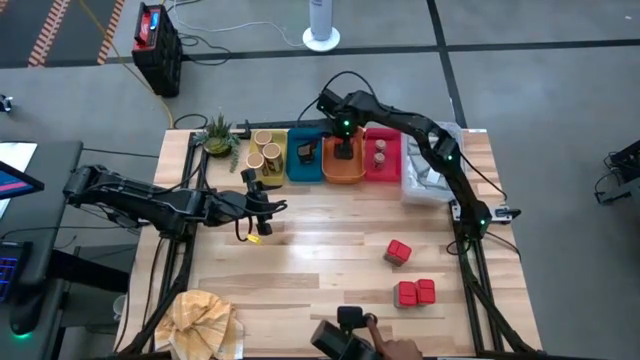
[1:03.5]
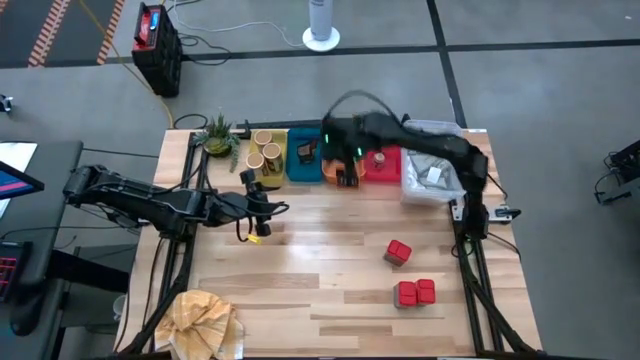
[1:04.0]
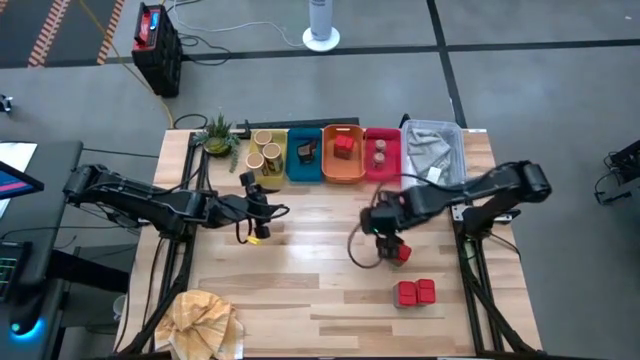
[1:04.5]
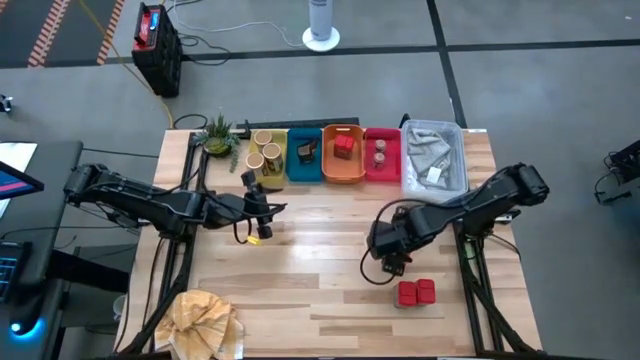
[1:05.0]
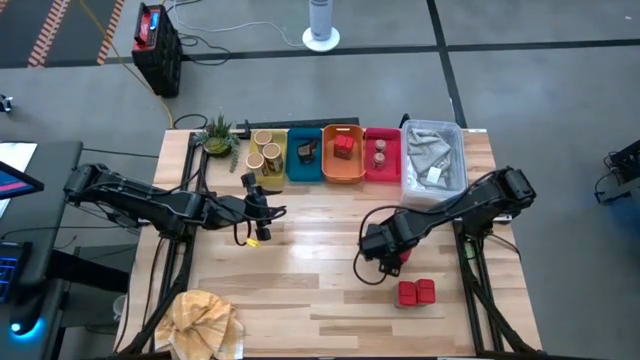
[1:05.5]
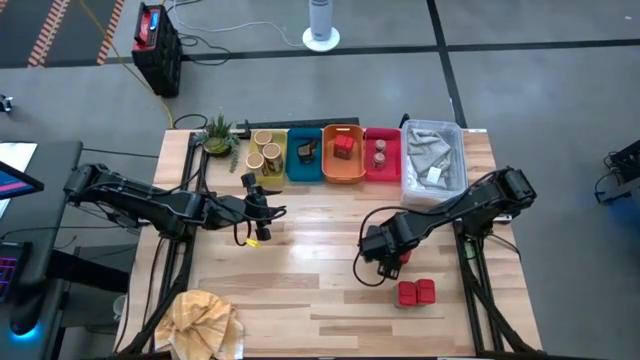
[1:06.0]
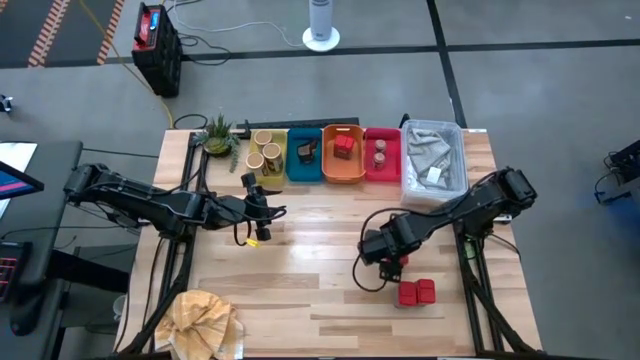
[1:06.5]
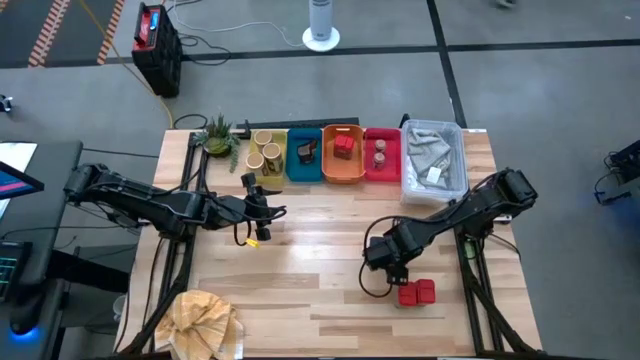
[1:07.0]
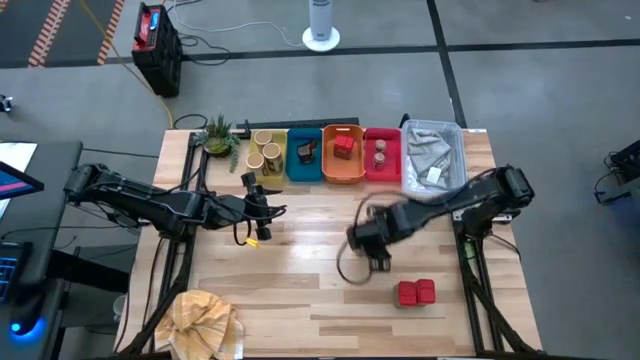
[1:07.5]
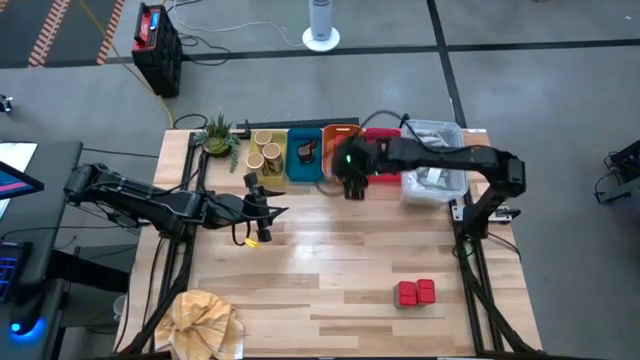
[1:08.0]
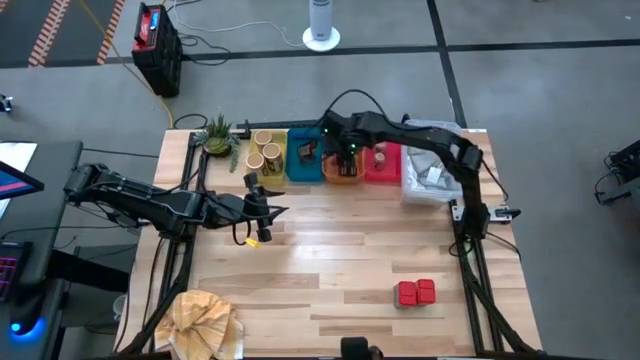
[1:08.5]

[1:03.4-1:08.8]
Task: Sort spices by type
Put the top red spice can into the orange bin

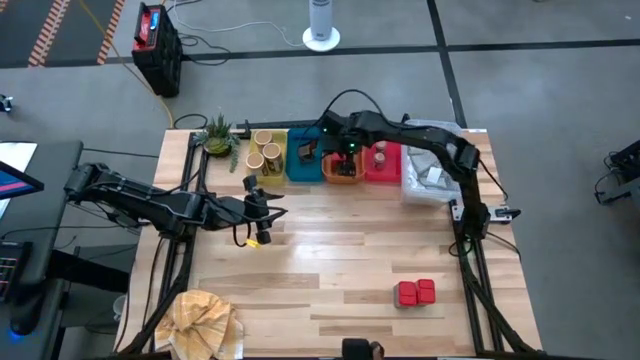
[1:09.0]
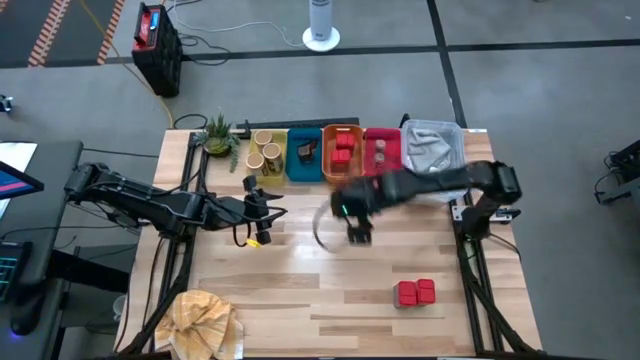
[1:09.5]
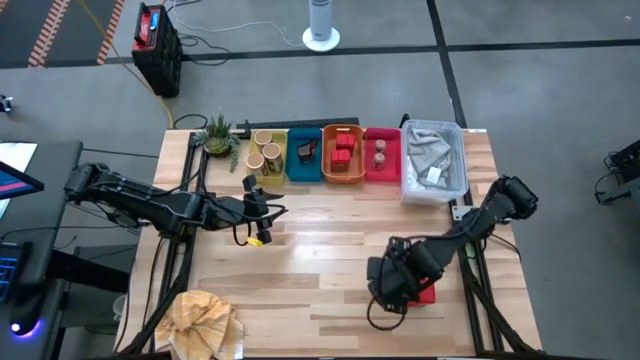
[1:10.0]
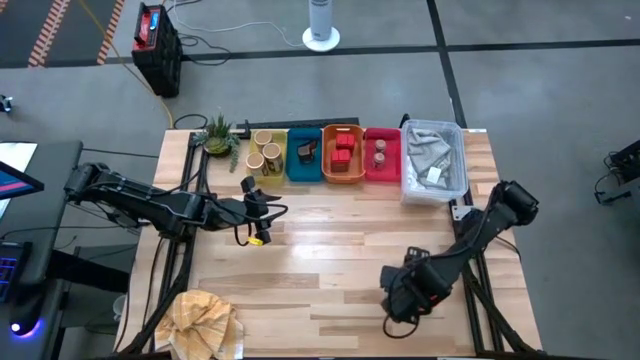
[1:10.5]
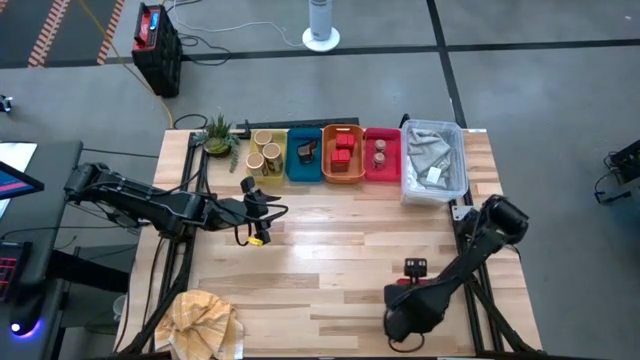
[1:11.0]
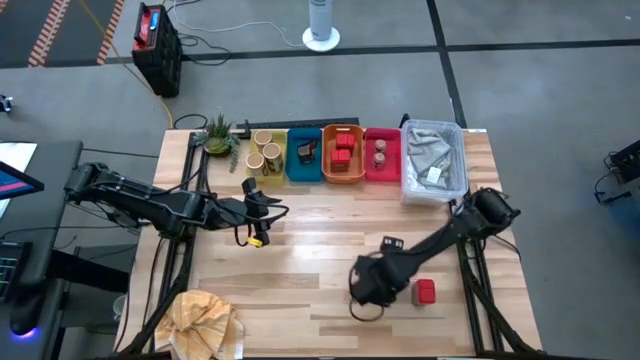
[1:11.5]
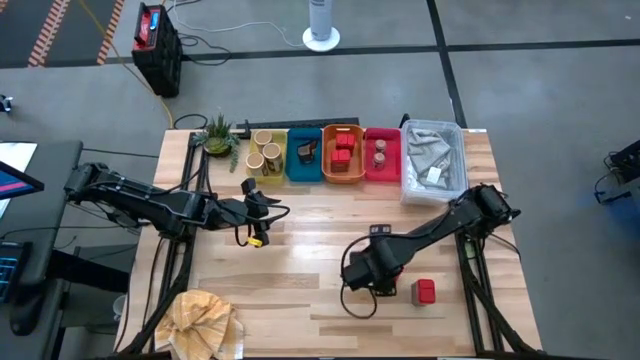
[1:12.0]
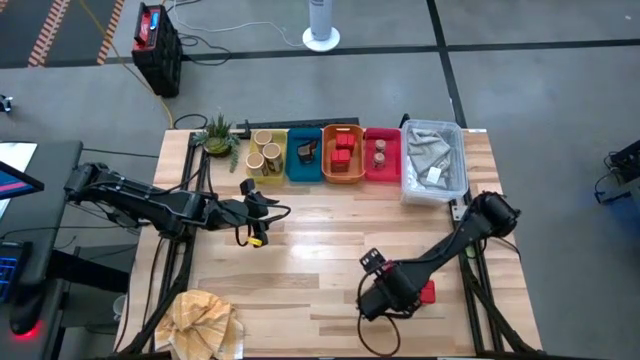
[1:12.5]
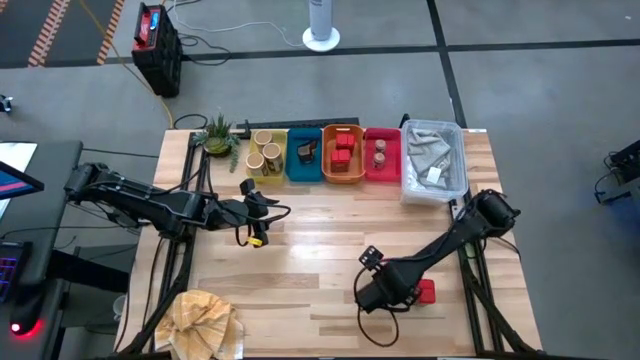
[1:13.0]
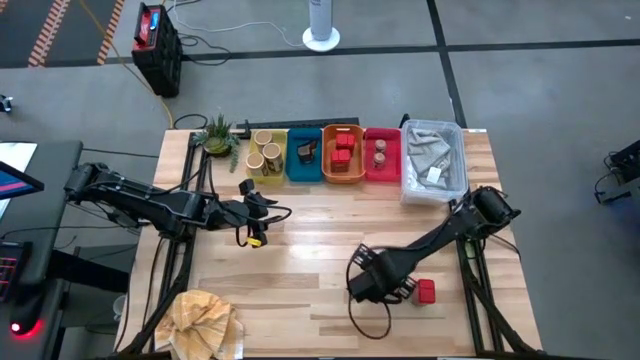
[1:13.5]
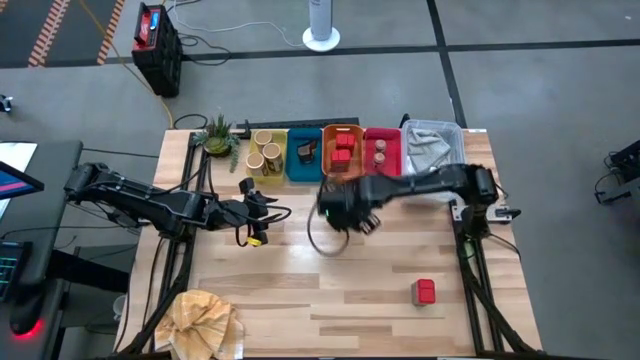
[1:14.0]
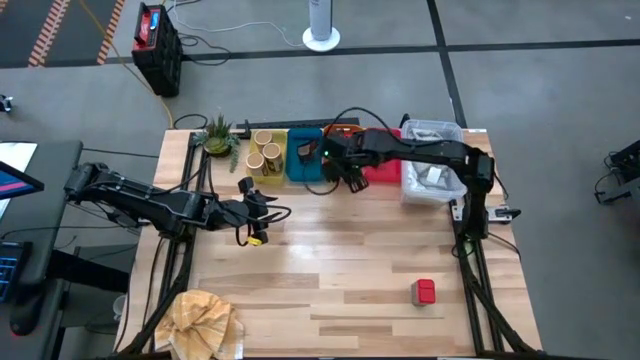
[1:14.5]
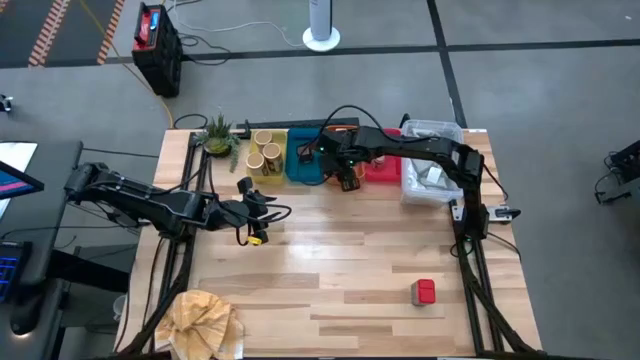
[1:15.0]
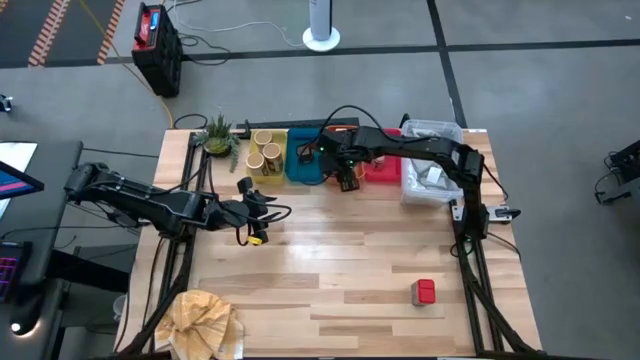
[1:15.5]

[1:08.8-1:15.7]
Put the left red spice container into the orange bin

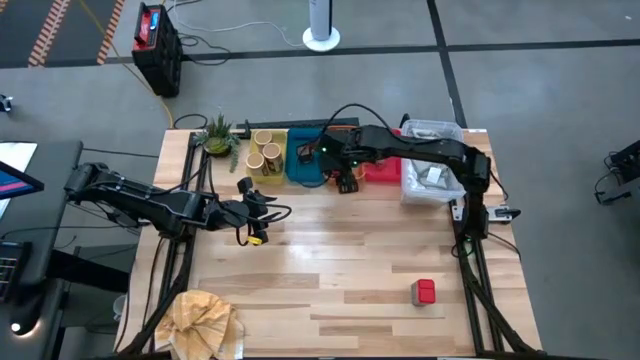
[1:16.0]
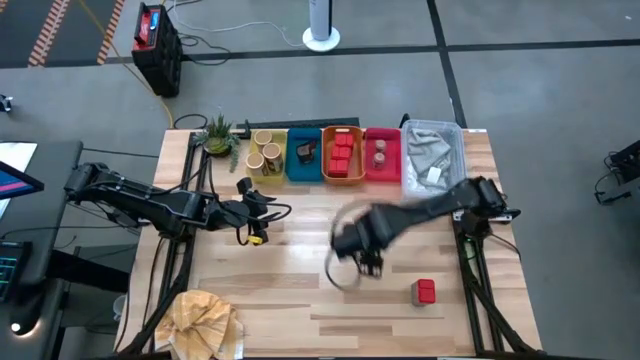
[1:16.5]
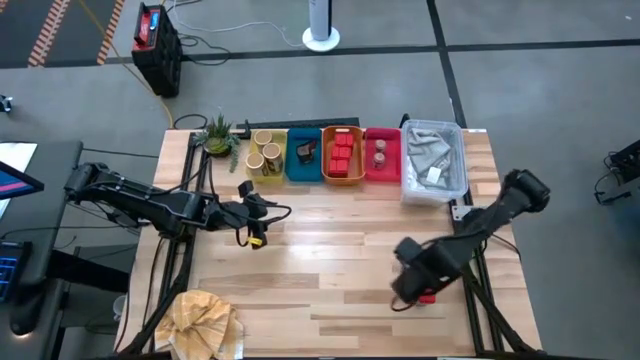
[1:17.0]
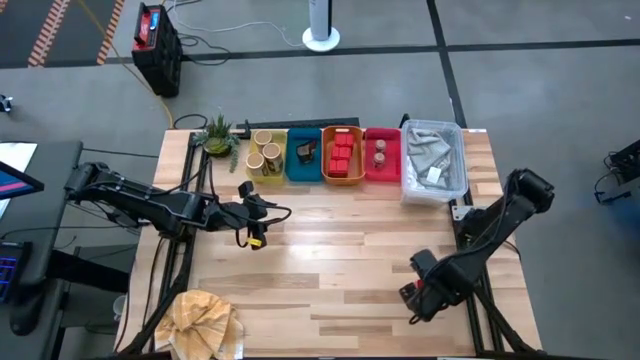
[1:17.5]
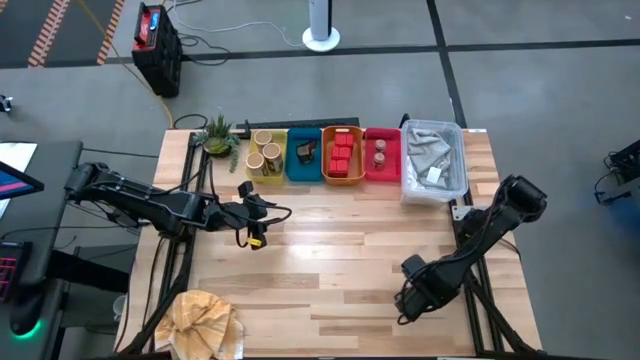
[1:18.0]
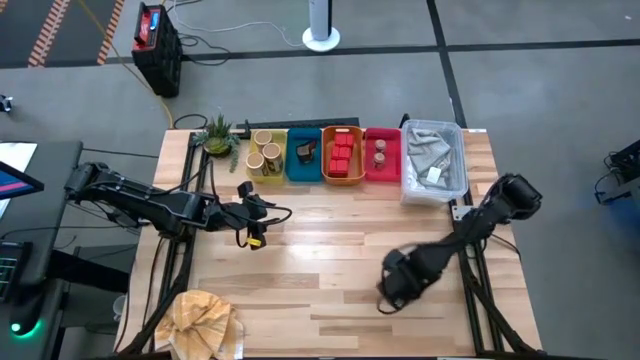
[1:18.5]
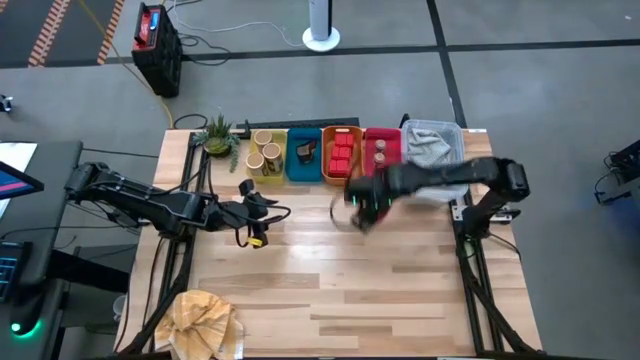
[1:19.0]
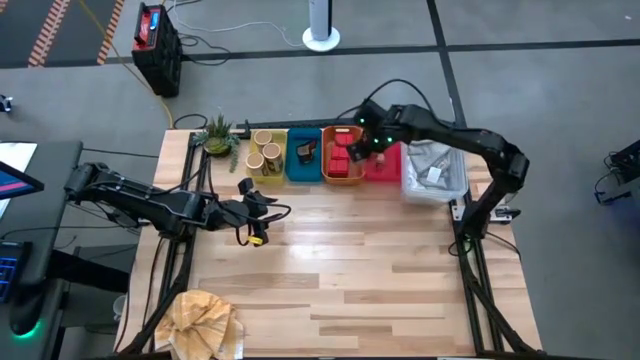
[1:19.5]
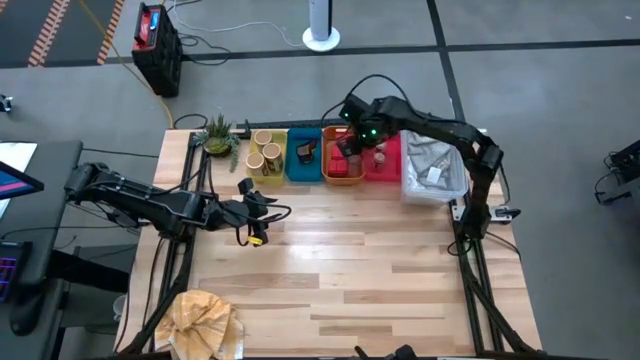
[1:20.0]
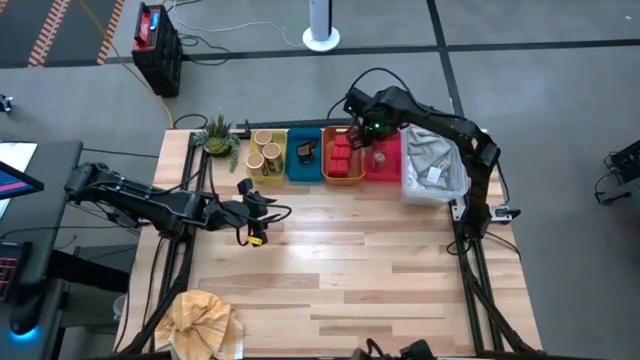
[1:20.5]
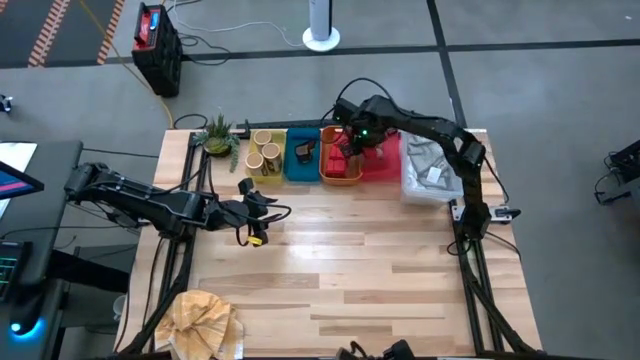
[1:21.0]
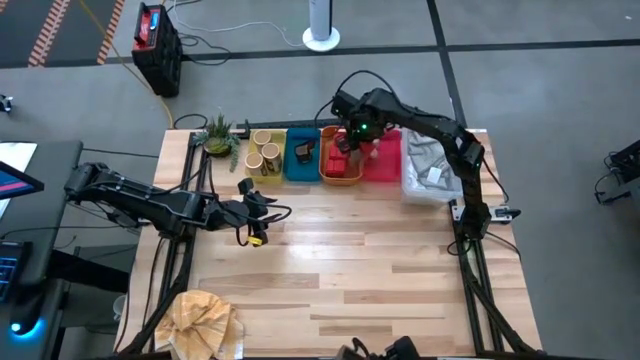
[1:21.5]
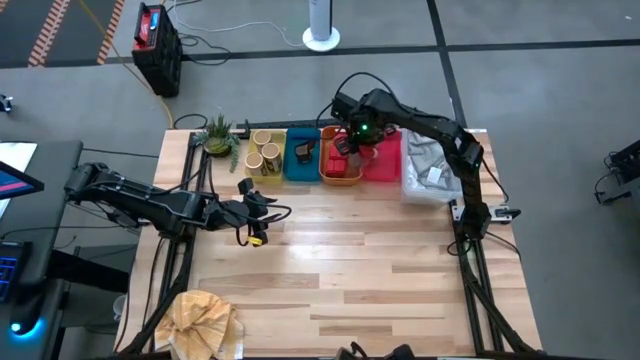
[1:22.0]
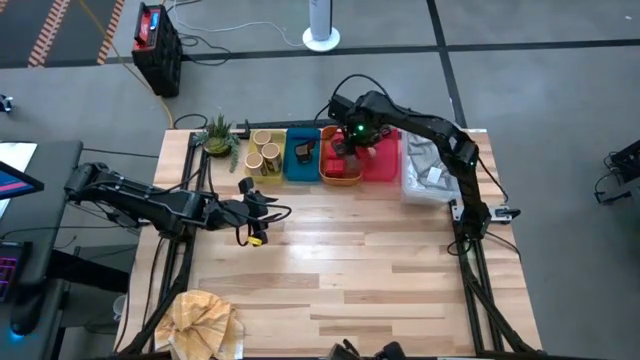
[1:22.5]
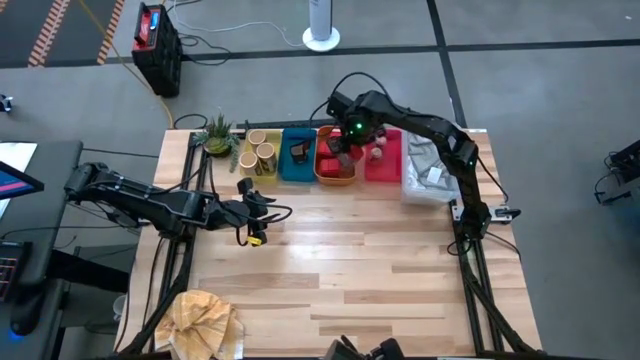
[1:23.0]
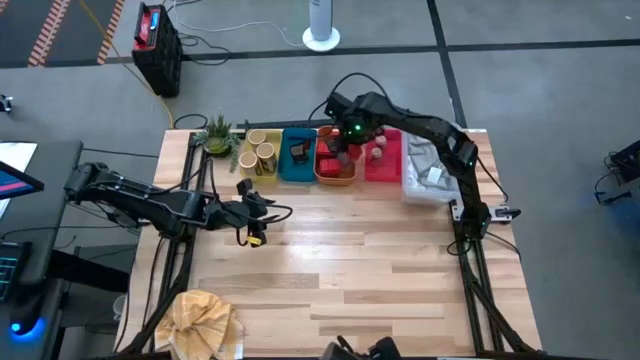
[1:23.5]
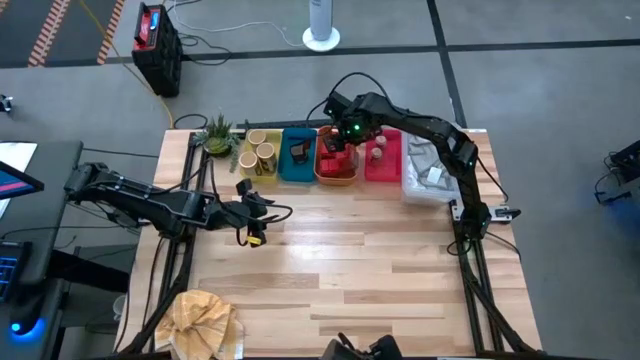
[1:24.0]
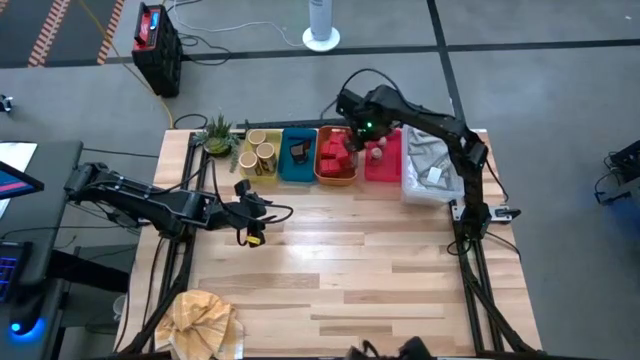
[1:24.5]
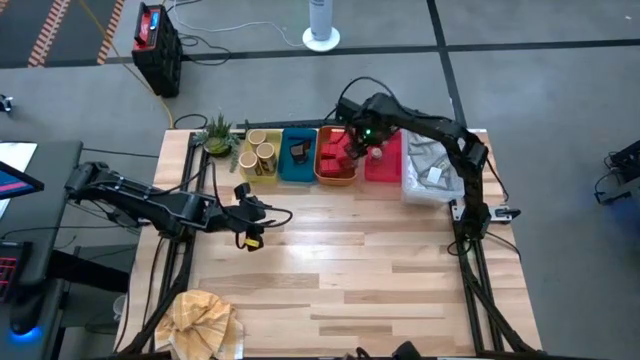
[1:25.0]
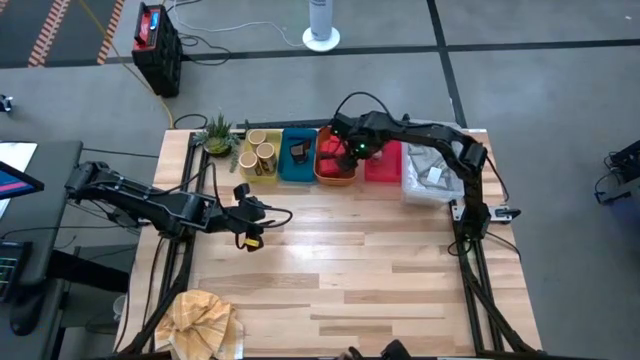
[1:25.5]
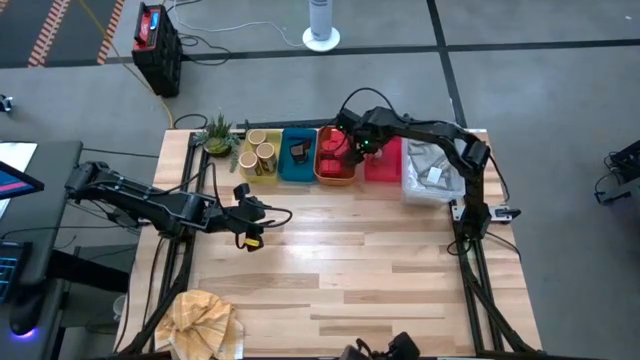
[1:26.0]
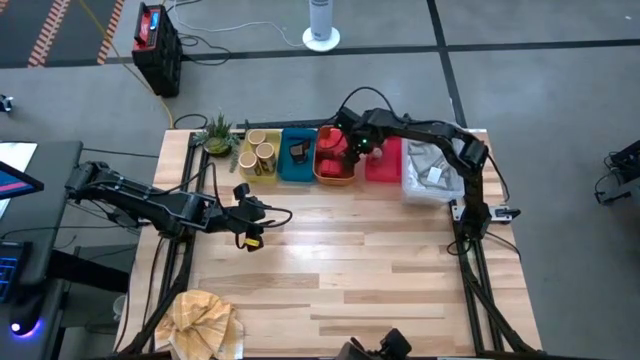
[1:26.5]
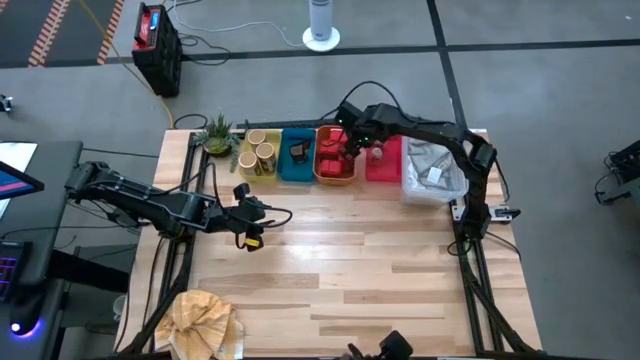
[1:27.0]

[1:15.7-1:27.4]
Put the red spice container into the orange bin
